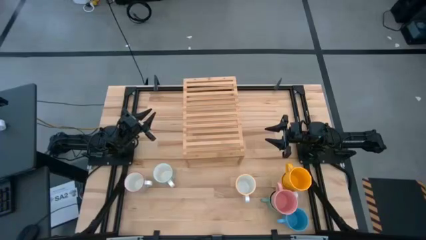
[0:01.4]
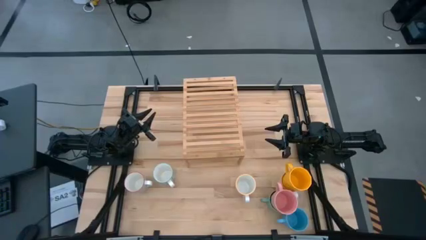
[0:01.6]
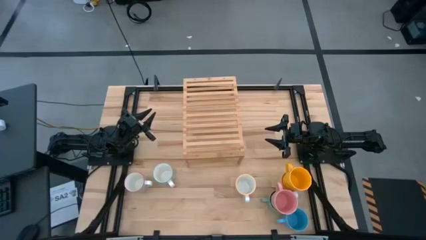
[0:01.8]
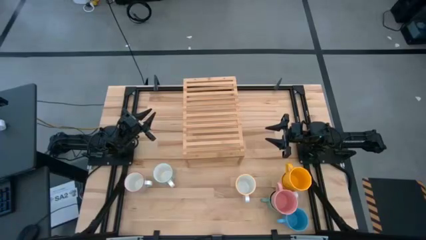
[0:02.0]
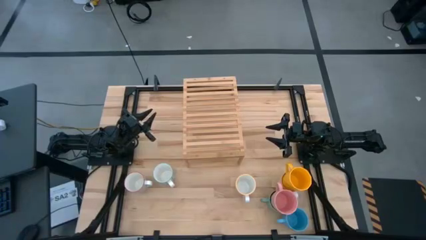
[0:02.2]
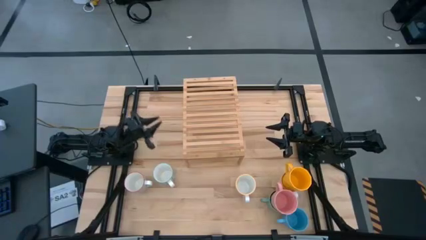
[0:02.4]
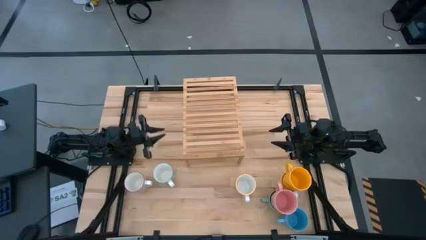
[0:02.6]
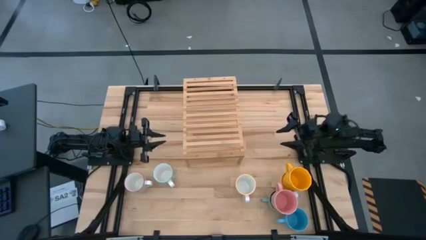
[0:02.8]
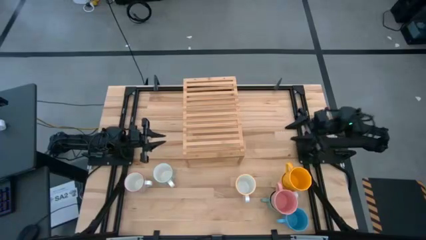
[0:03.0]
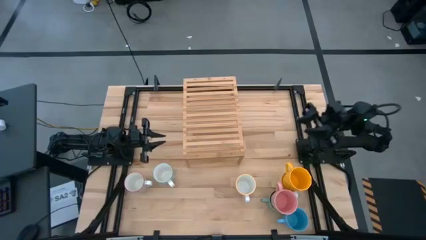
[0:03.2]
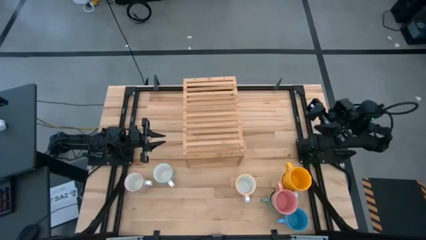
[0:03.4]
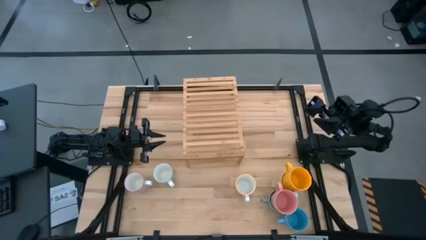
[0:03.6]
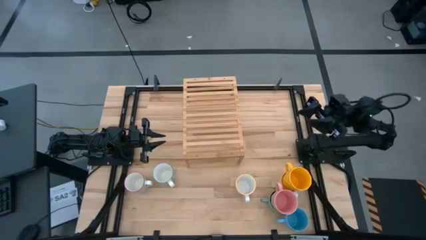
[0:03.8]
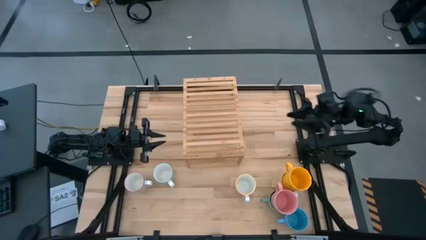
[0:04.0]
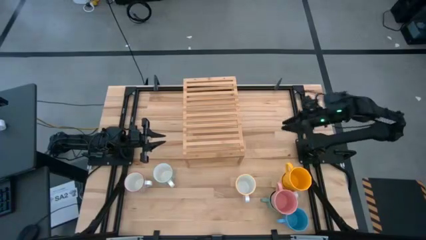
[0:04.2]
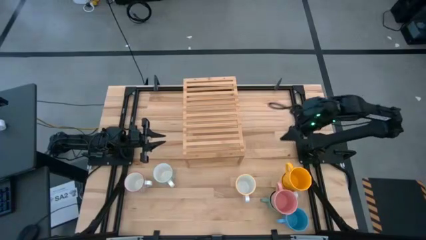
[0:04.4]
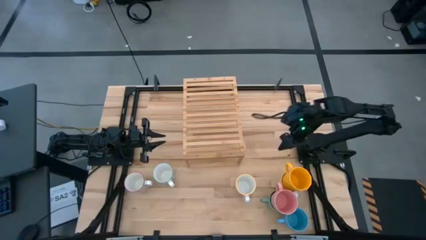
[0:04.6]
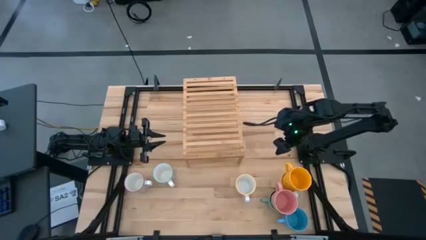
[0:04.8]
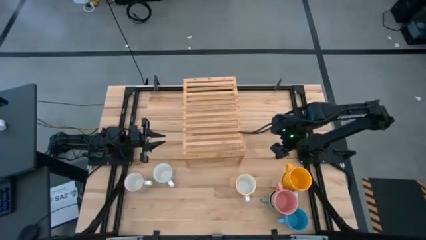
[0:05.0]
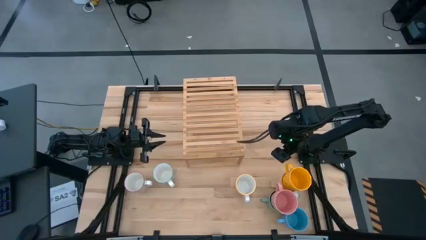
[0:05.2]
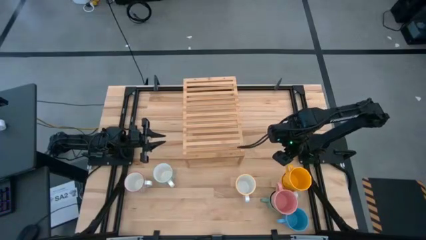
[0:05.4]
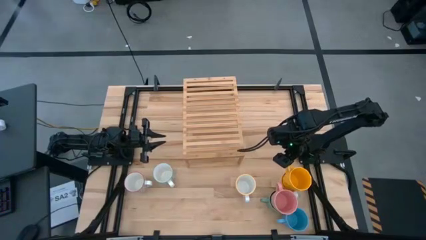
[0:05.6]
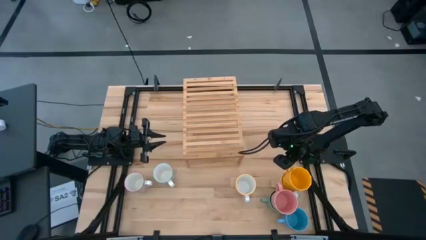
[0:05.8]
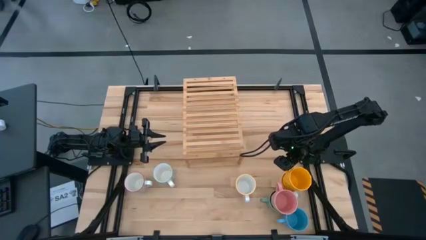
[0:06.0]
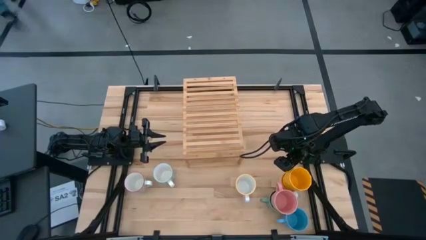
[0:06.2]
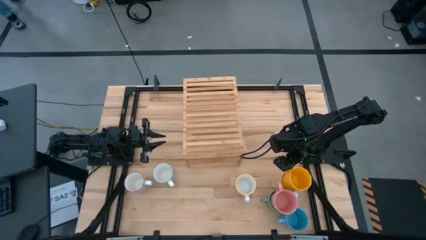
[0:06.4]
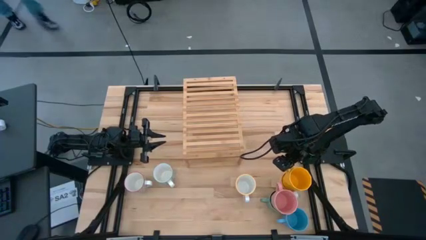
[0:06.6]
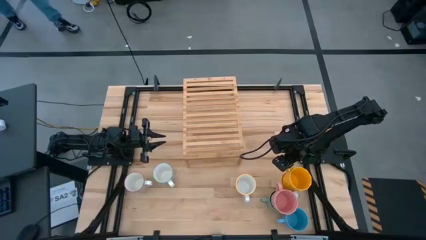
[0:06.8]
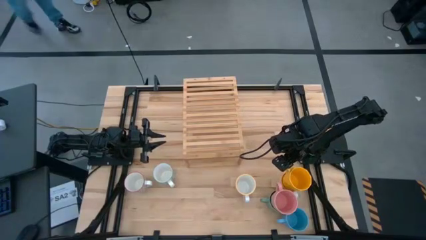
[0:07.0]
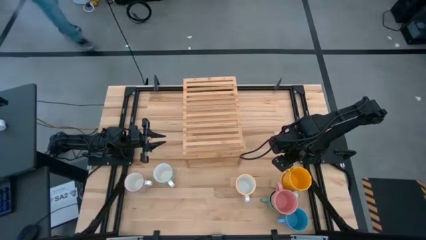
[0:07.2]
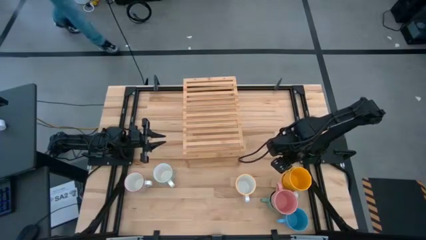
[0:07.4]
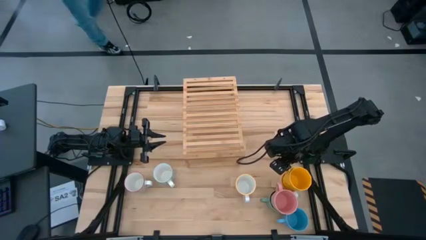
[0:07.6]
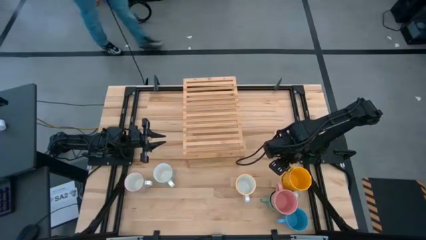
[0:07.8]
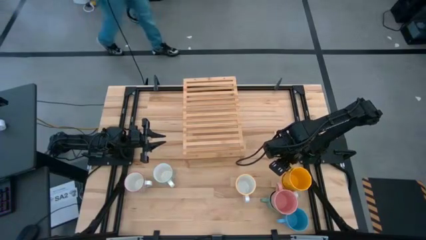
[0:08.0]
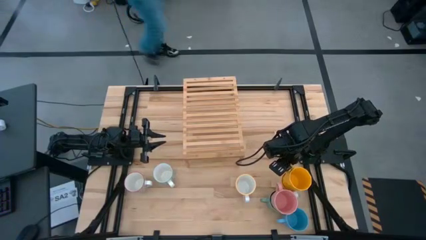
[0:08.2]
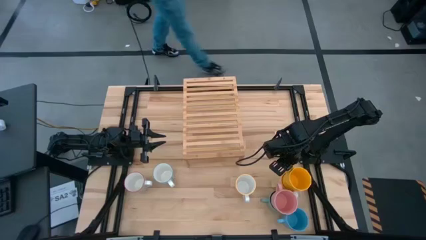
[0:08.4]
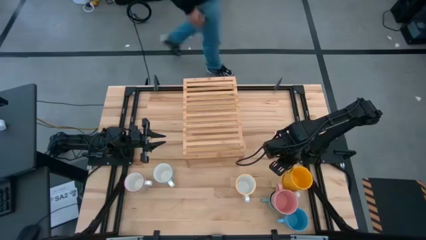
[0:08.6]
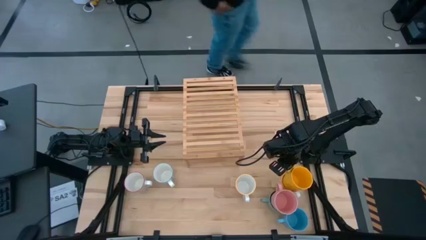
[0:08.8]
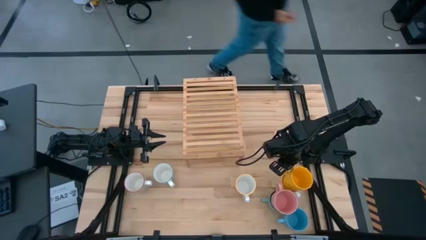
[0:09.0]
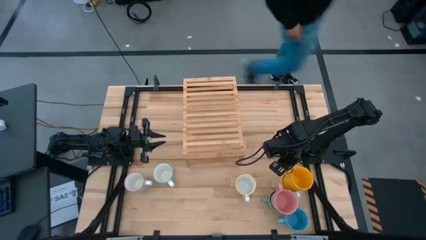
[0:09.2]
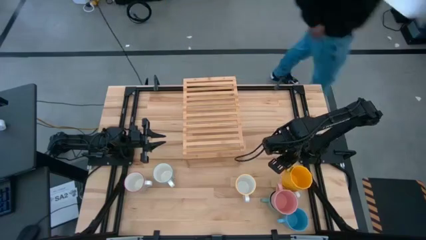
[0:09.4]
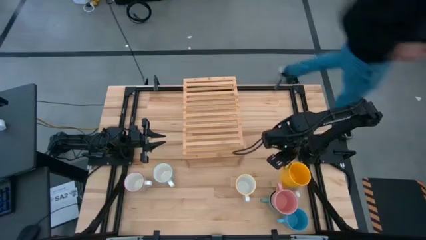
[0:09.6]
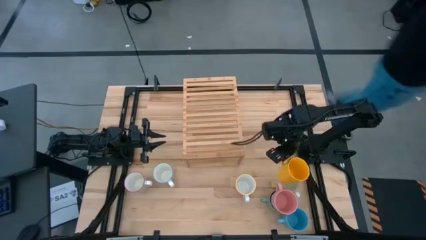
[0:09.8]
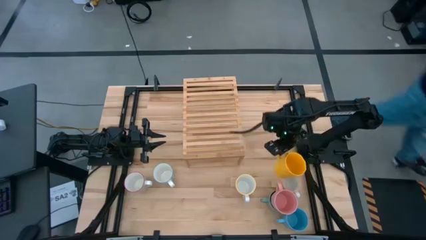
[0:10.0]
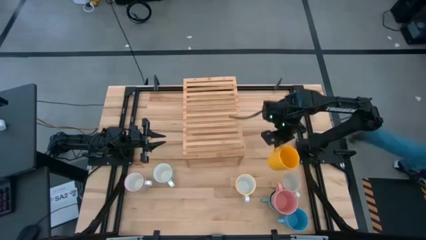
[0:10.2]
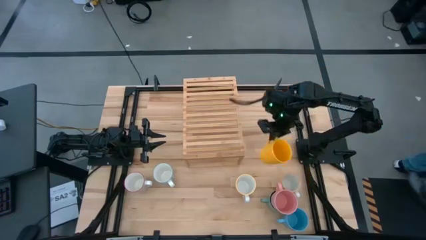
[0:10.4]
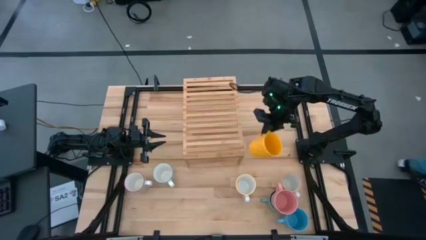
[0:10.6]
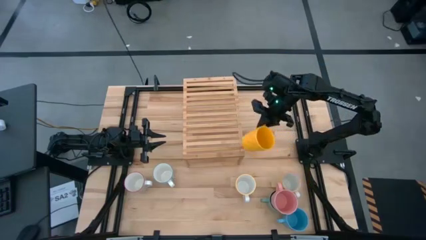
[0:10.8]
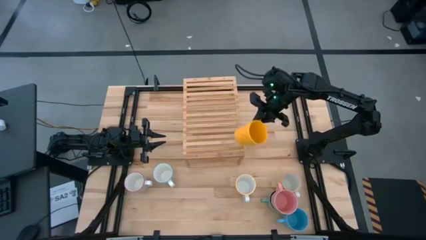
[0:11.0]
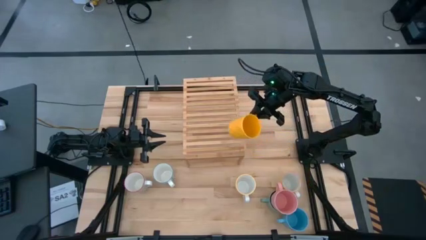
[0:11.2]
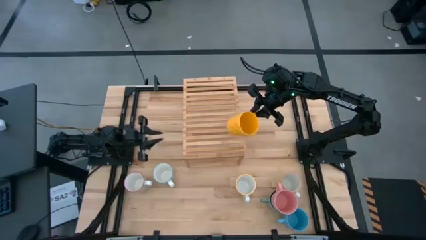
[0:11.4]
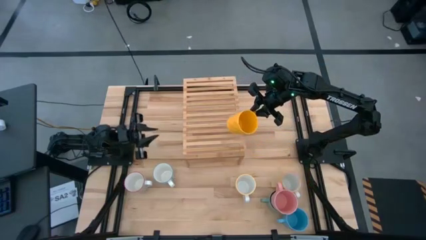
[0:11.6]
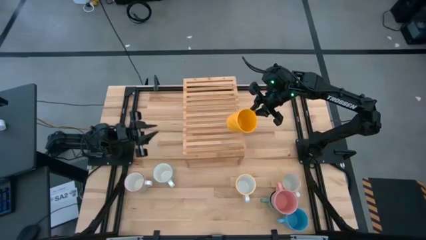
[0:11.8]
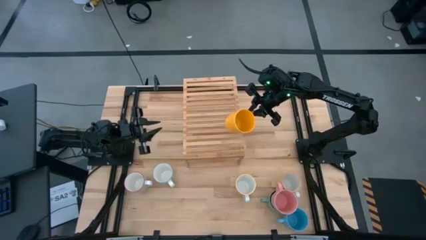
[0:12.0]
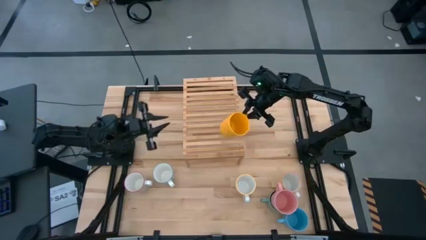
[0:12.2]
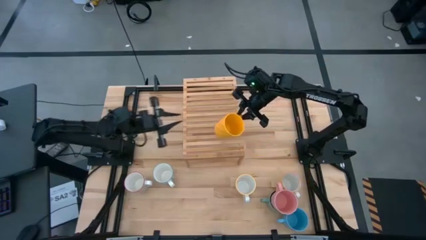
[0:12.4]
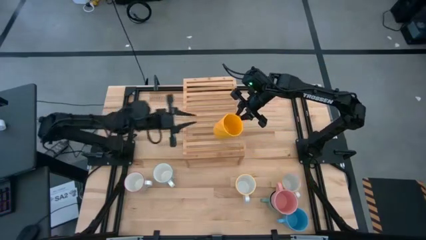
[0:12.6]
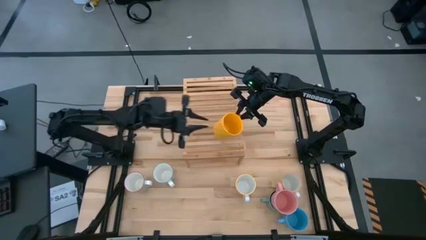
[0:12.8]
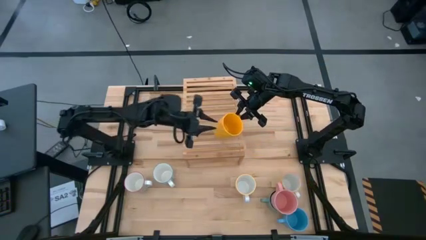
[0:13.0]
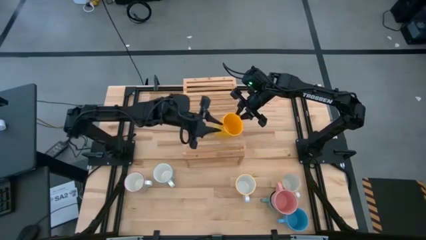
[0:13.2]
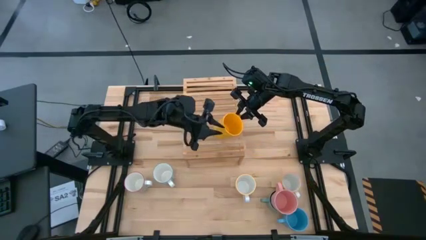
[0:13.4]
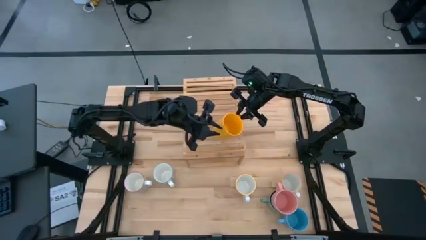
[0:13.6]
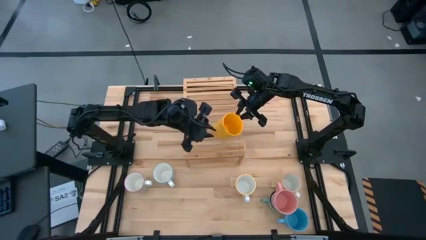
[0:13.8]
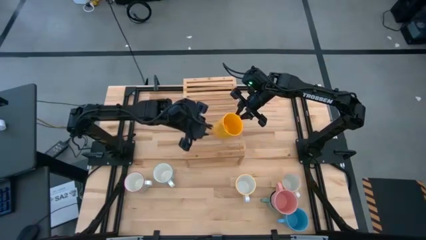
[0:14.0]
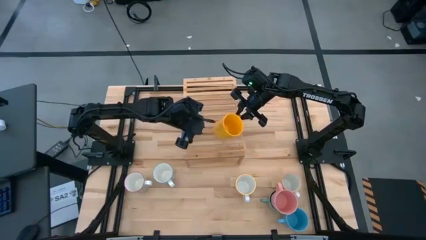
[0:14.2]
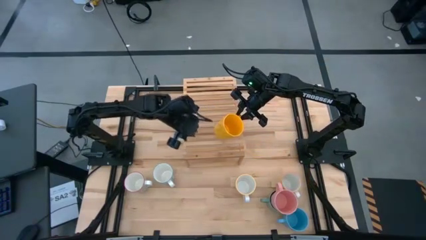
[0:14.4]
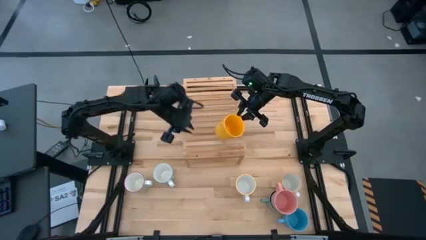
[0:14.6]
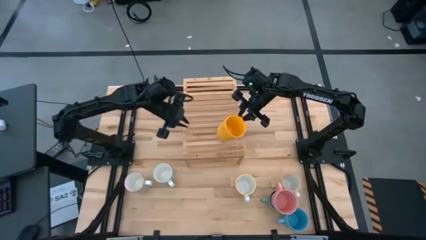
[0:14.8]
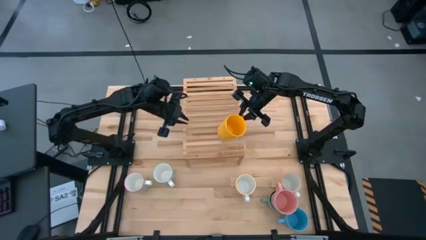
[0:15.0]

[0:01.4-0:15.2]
Task: Place coffee mugs
Put the top yellow cup on the shelf
